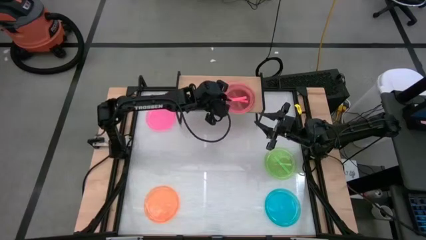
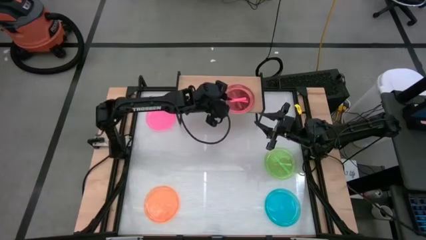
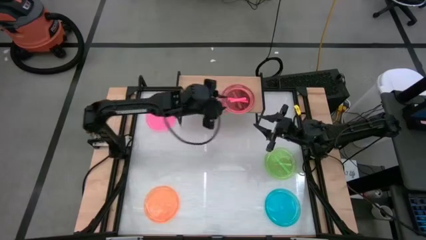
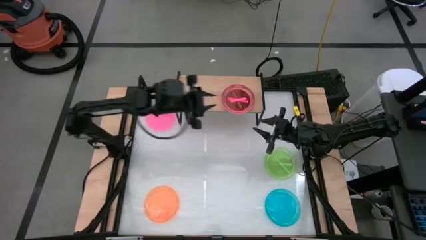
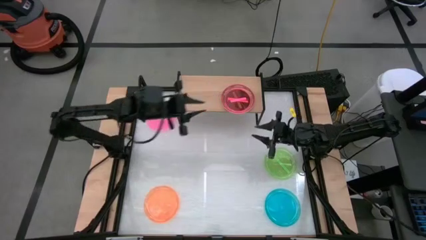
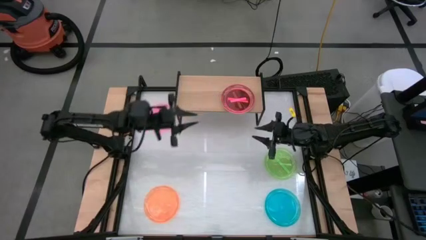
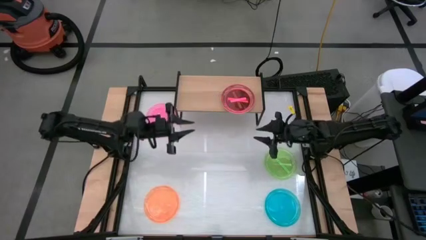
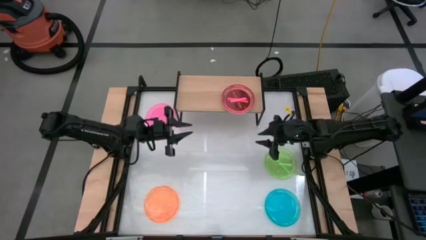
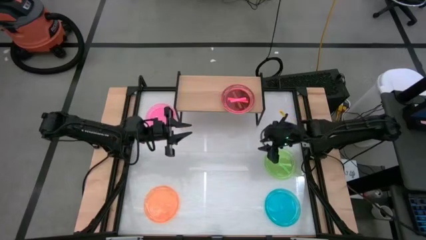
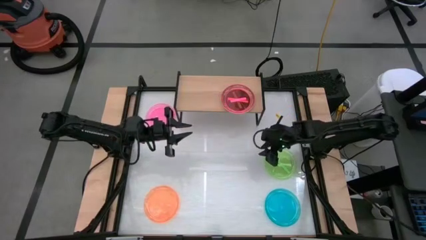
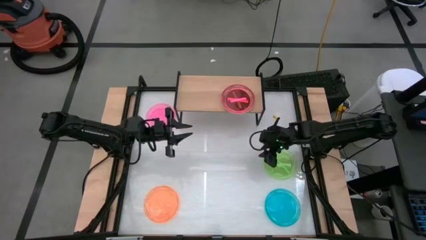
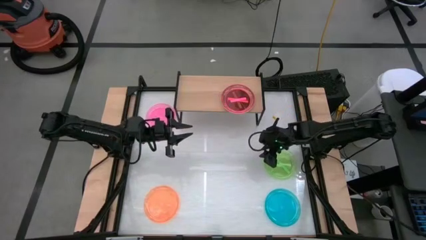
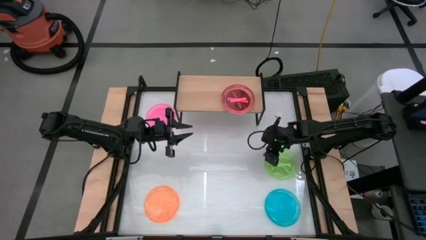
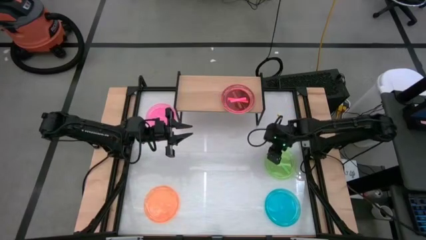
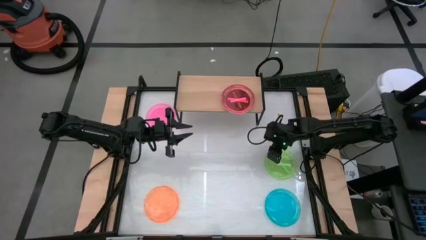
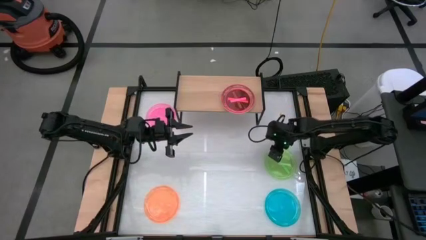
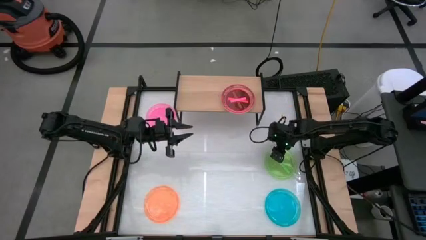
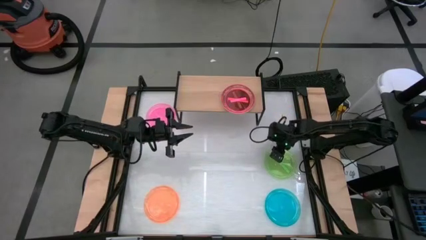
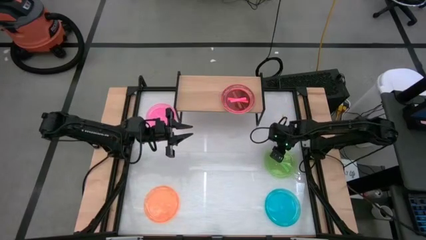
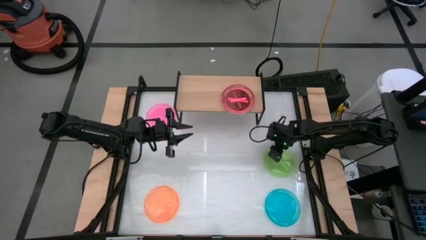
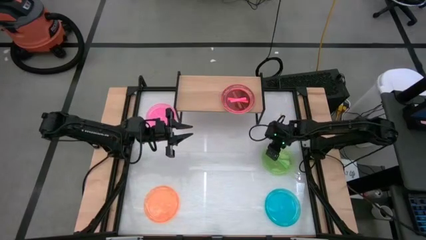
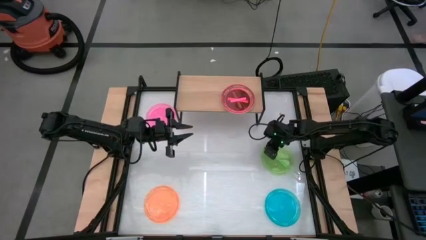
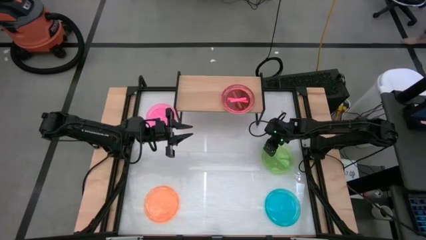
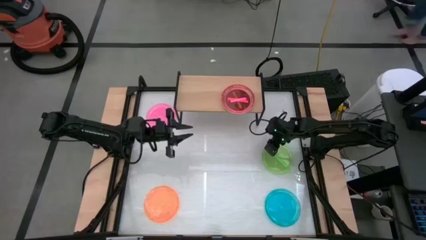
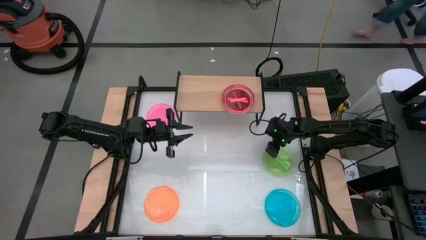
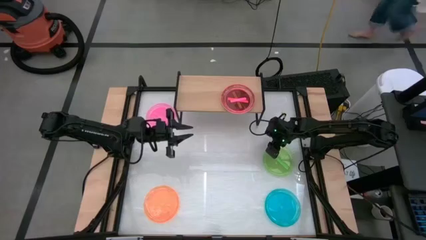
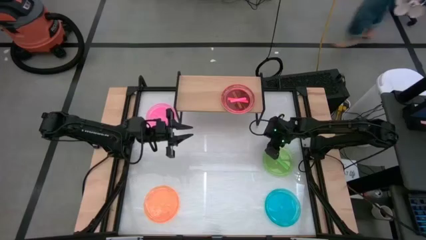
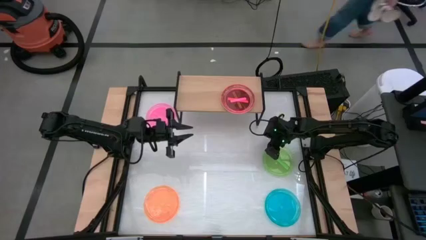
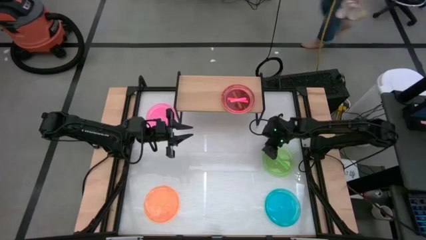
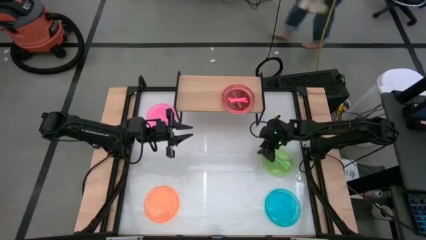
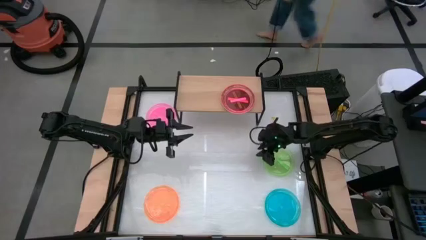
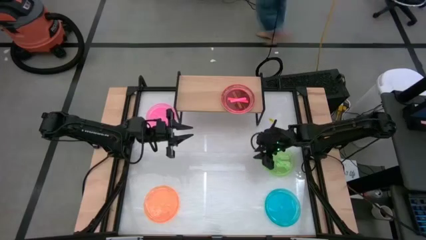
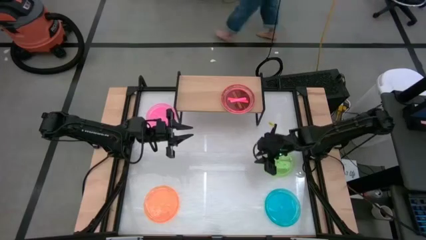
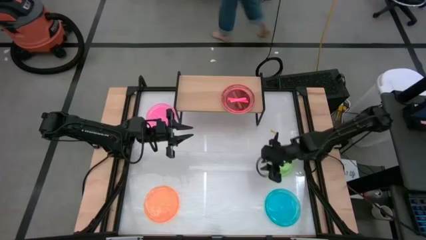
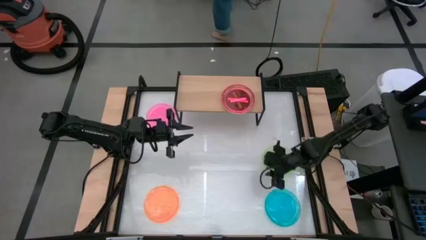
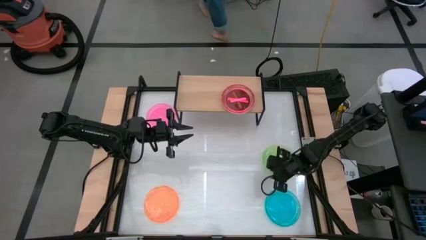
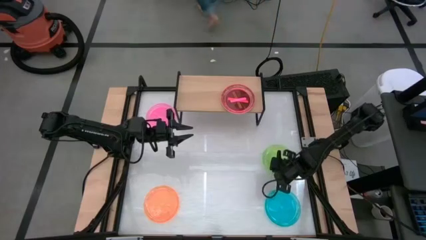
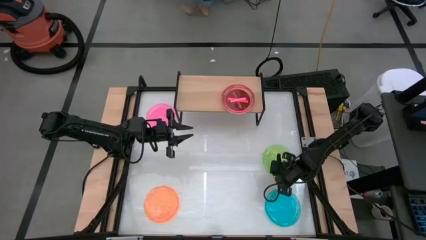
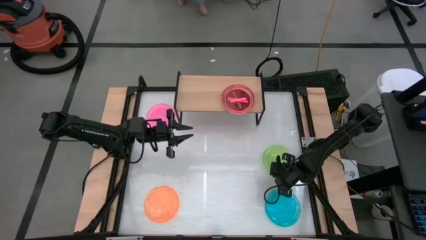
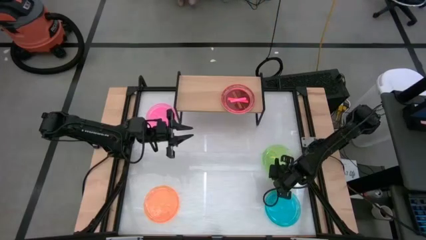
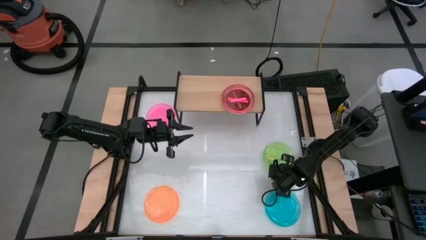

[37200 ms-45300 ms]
Task: Place and stack plates onto a shelf
Put the green plate on the shelf

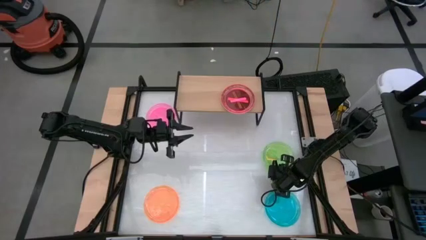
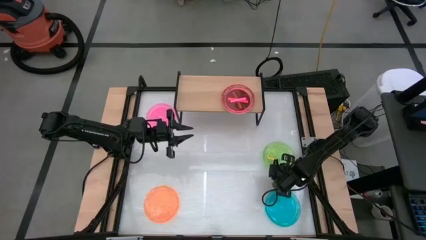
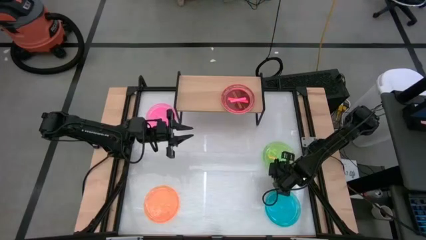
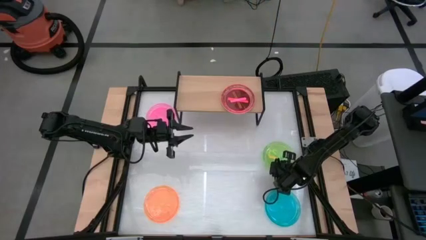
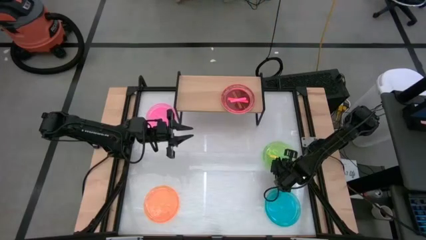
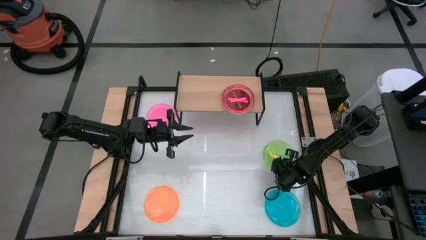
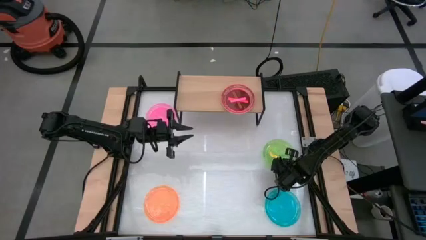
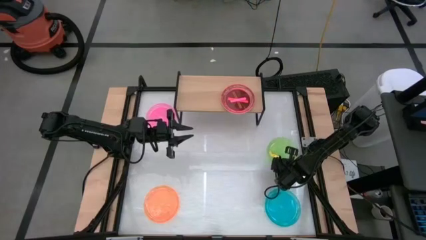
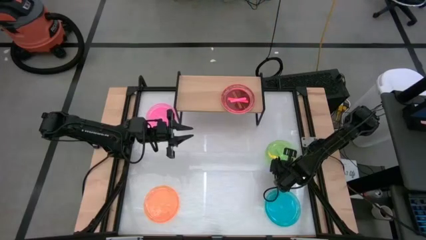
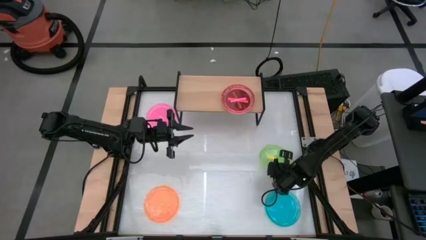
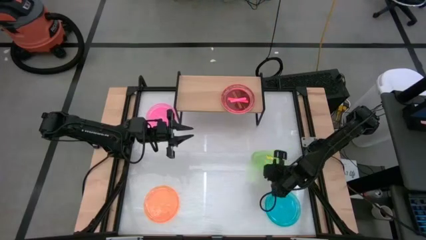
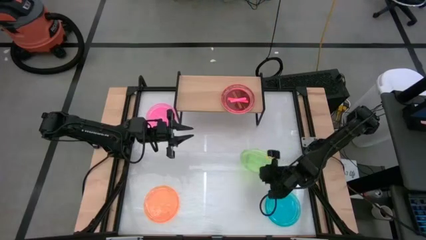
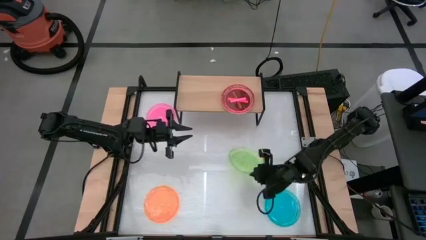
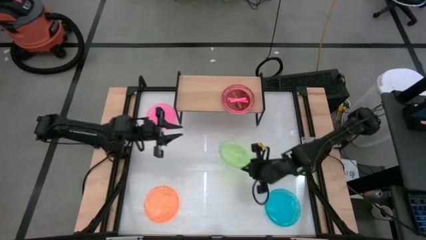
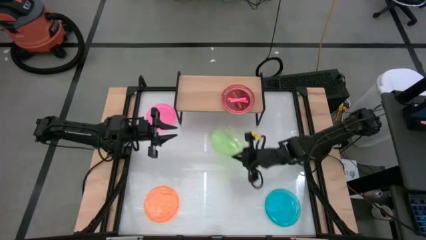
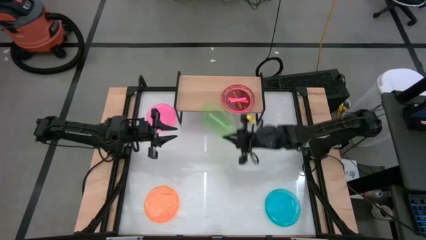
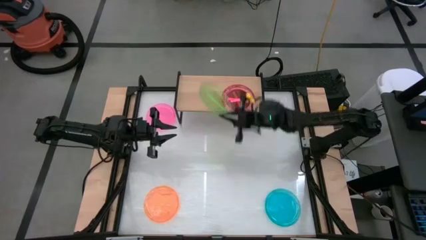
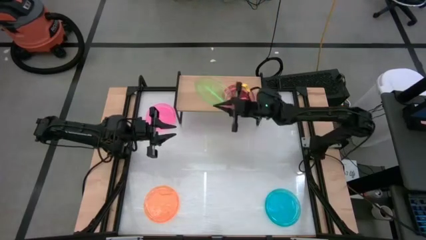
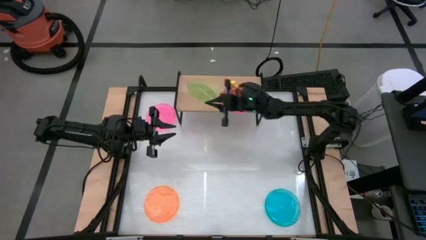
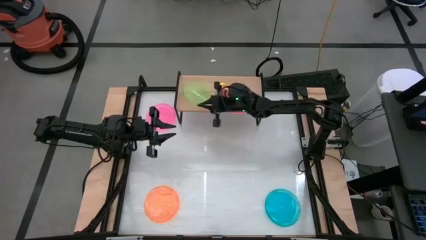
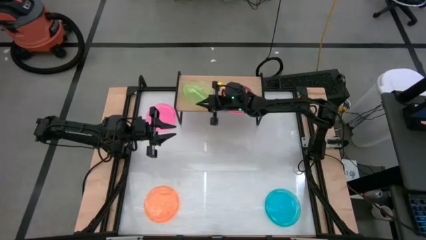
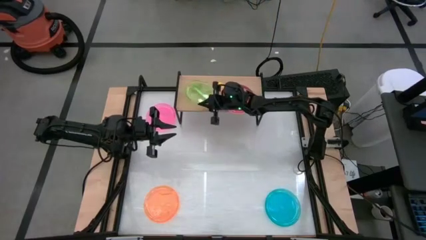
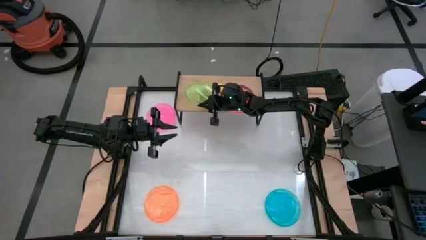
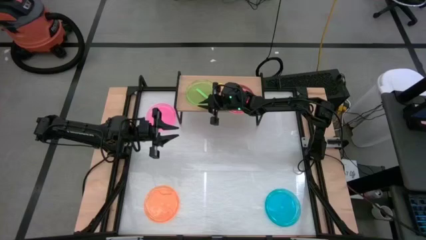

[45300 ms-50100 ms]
Put the green plate on the shelf

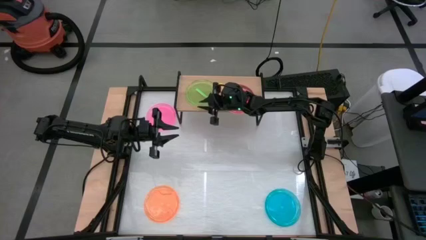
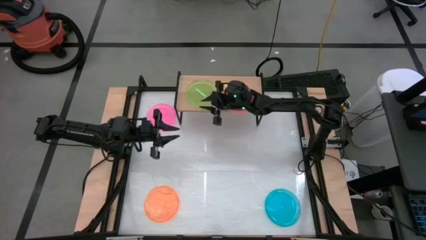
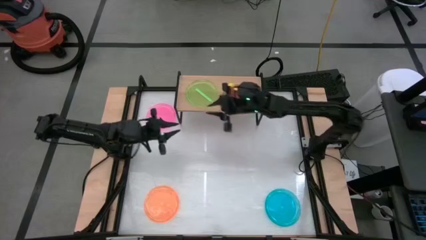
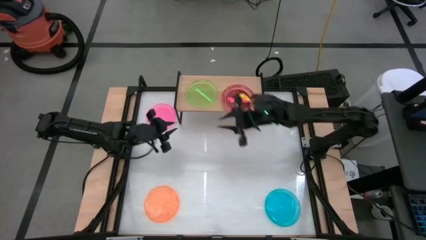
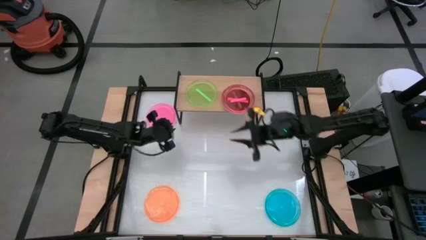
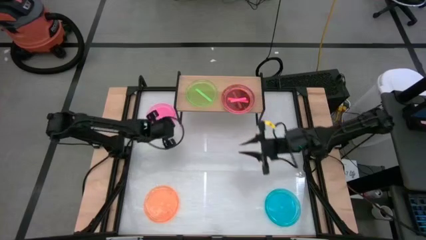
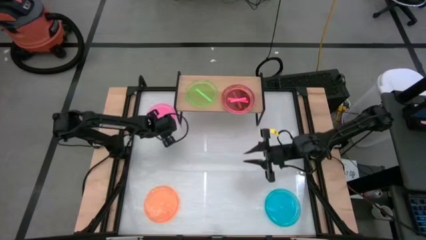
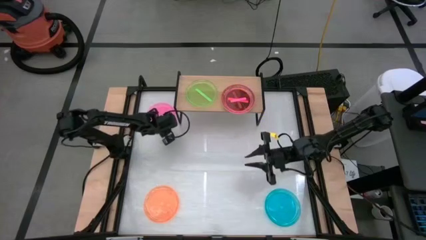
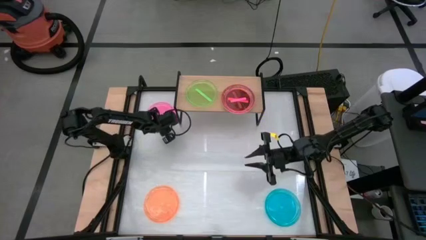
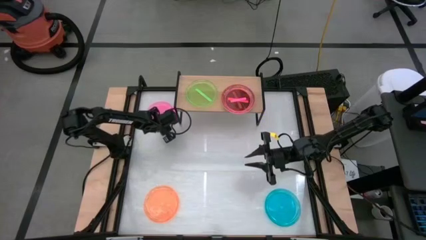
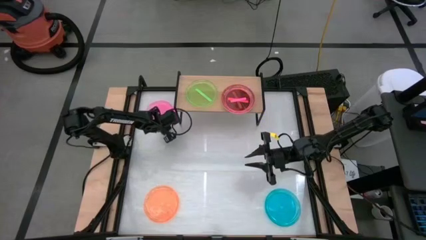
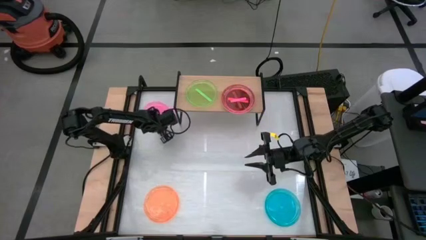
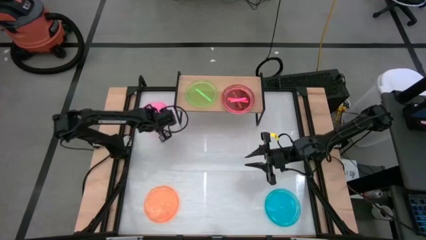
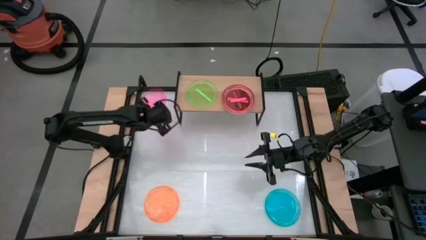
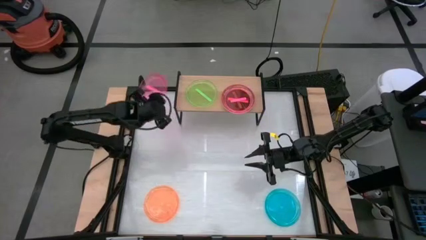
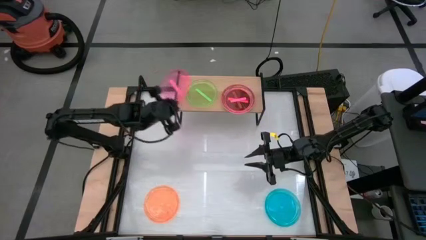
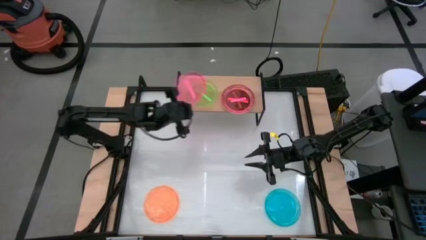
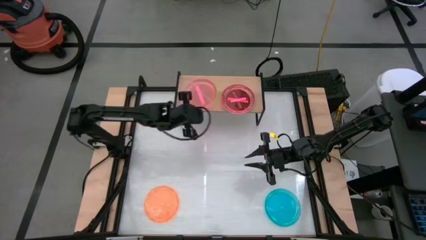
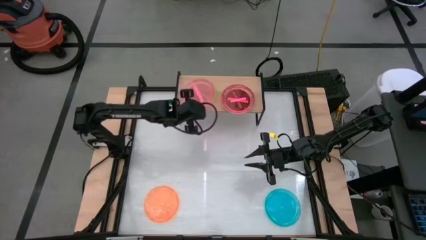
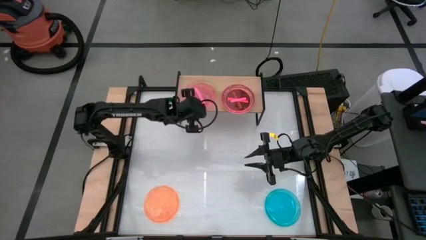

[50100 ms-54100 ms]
Stack the pink plate on top of the green plate on the shelf
